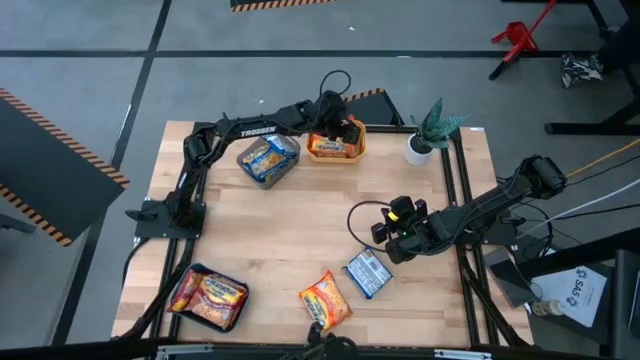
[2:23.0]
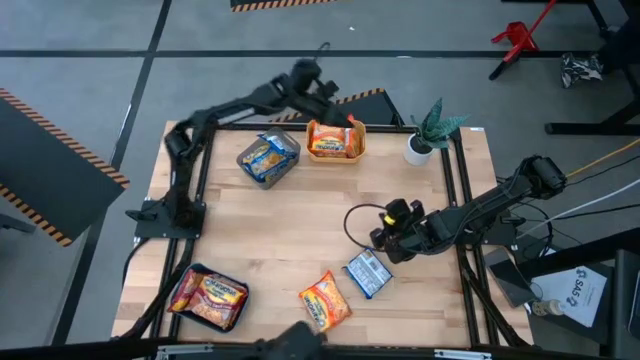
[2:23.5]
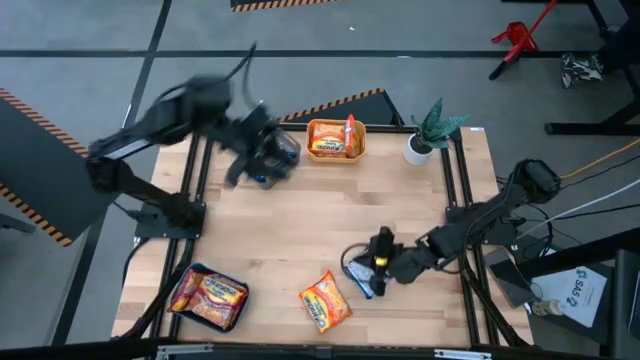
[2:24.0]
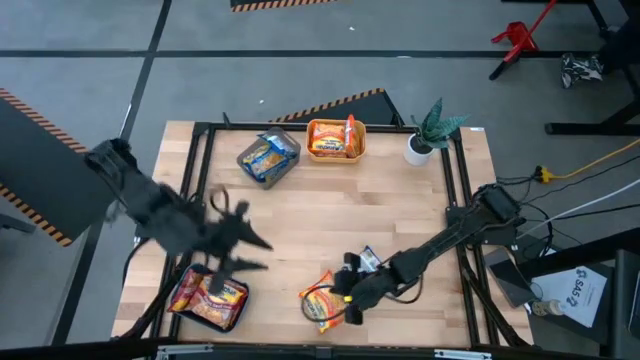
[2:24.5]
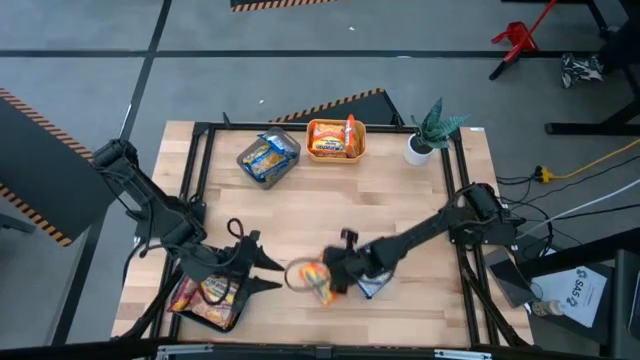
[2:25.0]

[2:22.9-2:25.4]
Task: Sort Maruchan noodles
Move the pack of orange ramen noodle soup from the bottom to the center

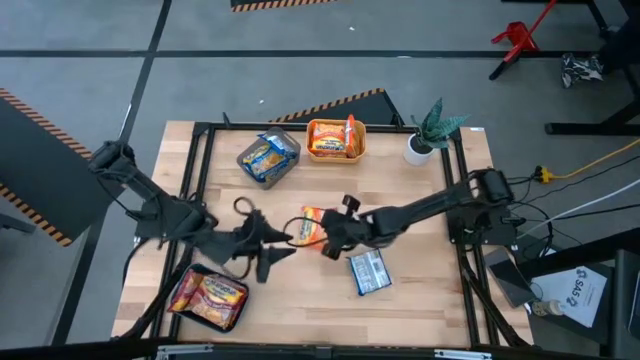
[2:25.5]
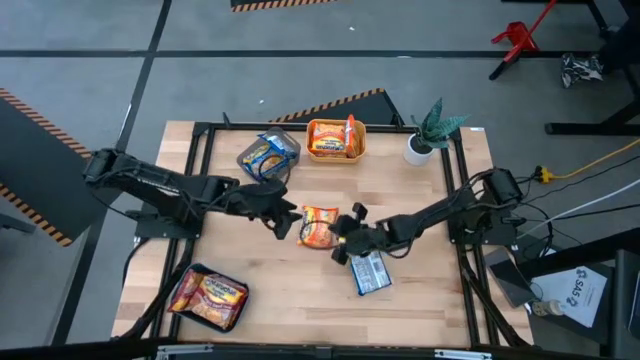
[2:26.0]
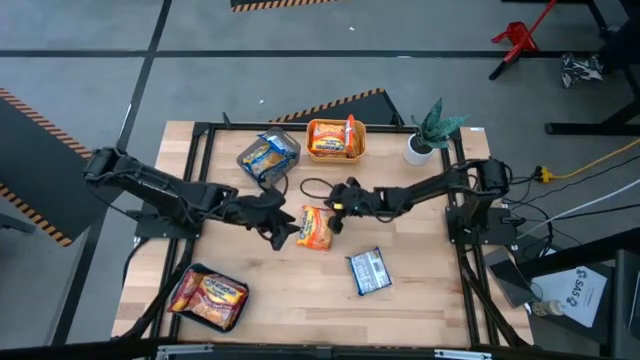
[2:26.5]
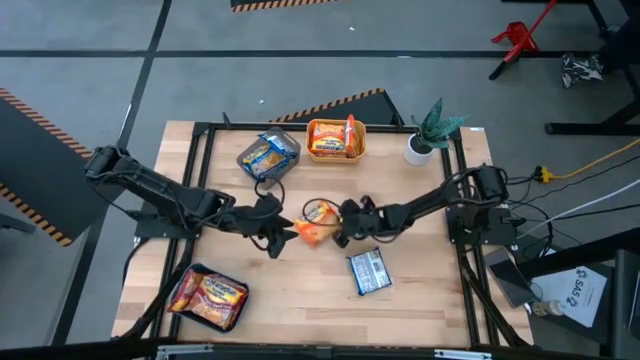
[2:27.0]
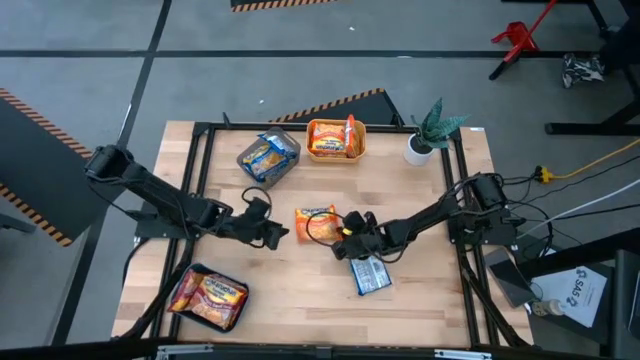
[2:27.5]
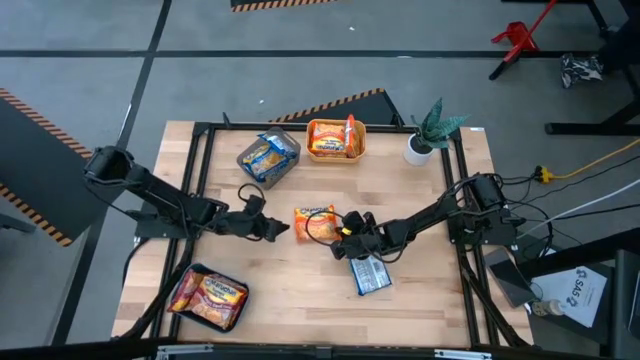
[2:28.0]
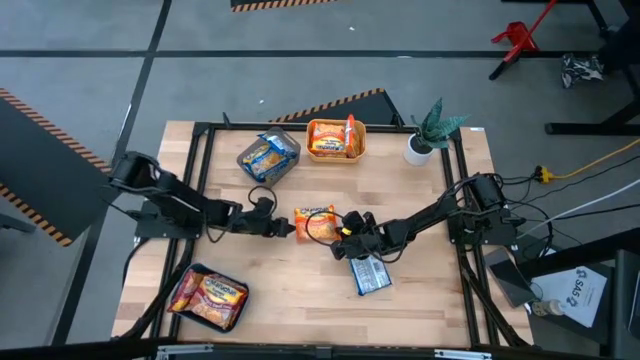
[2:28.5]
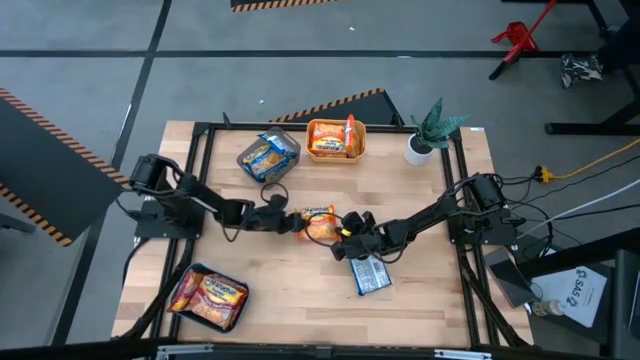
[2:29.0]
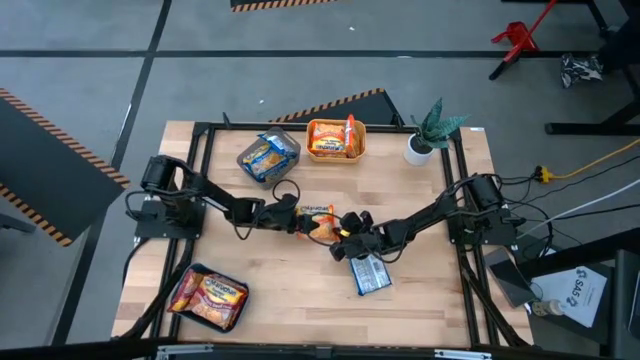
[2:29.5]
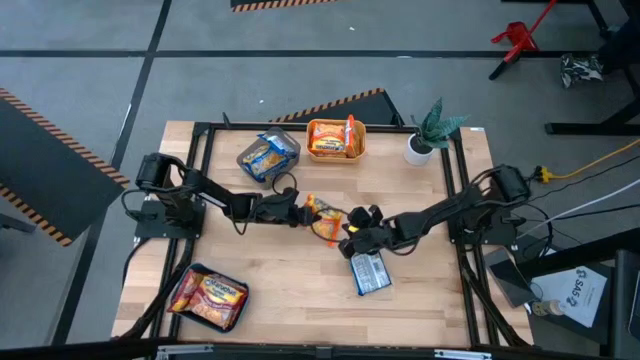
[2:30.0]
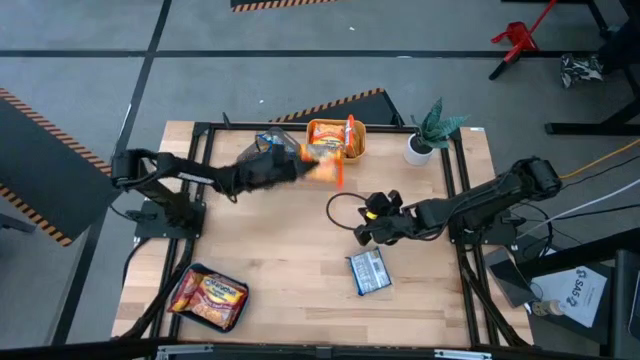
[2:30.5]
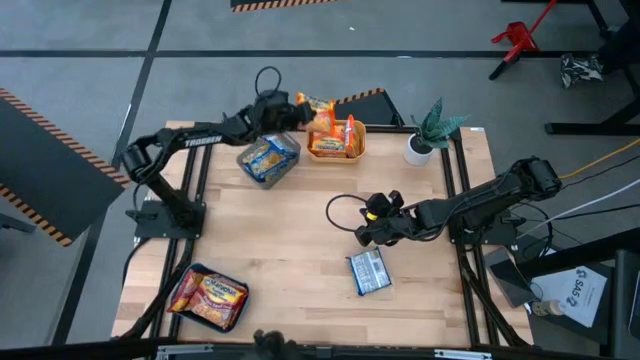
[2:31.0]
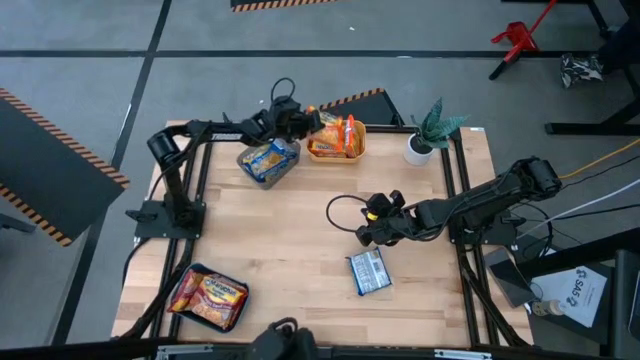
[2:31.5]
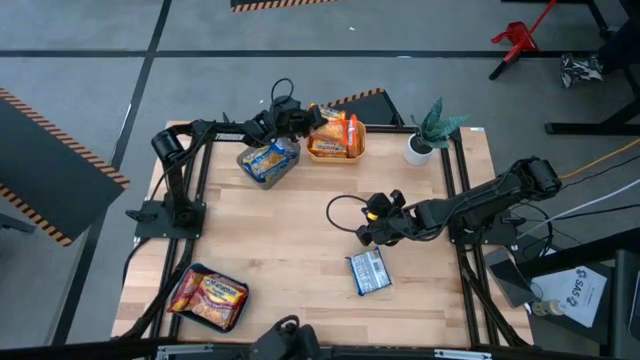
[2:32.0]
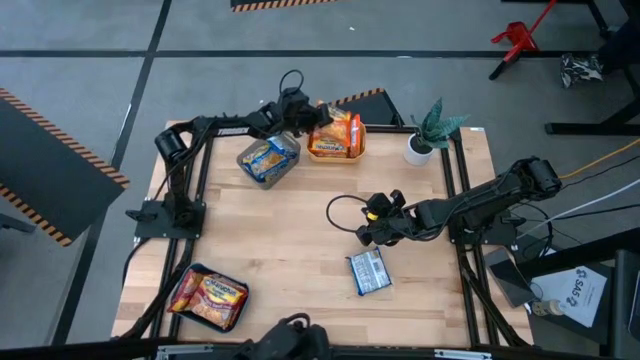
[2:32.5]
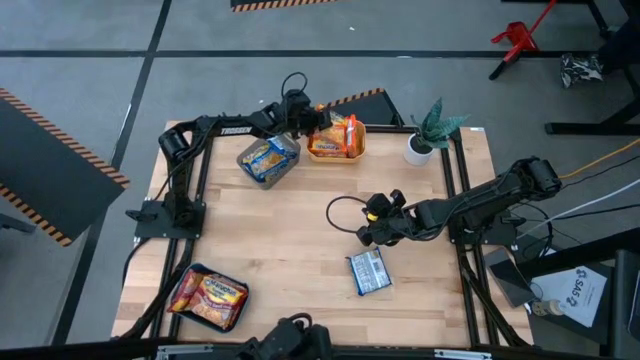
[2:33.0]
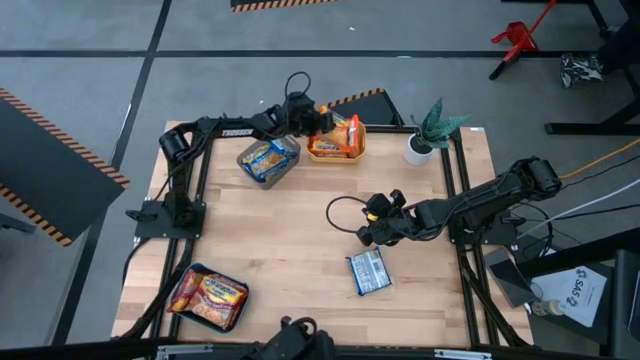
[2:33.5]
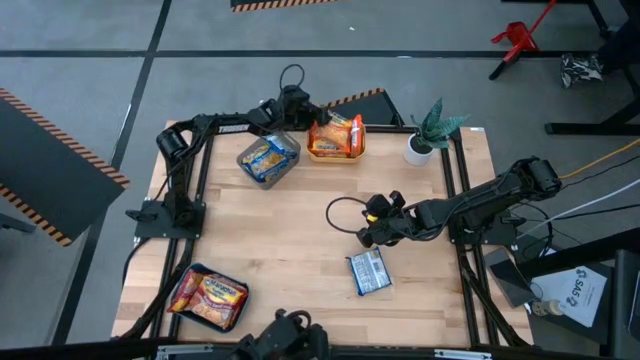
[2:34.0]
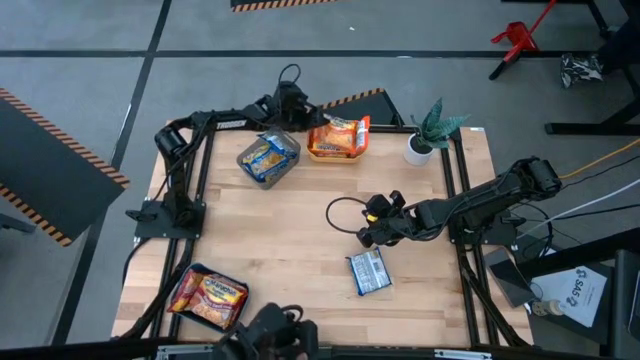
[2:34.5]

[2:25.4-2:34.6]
Put the pack of orange ramen noodle soup into the yellow bin

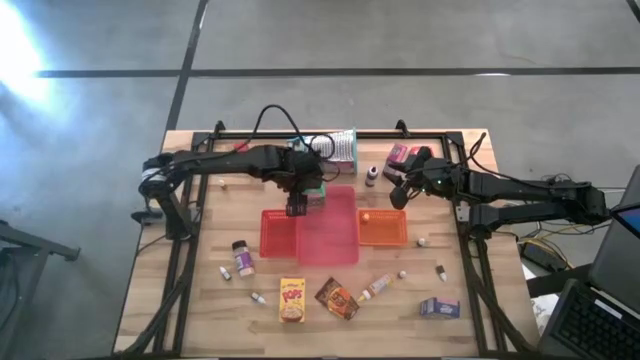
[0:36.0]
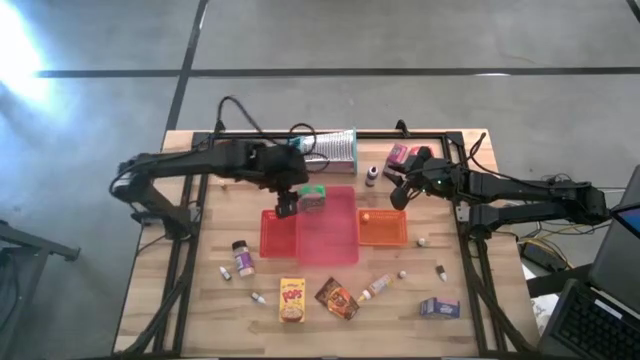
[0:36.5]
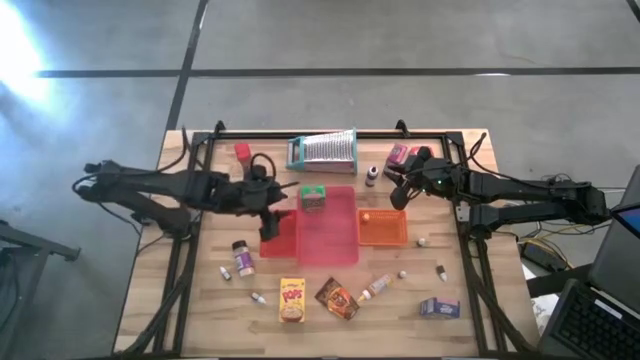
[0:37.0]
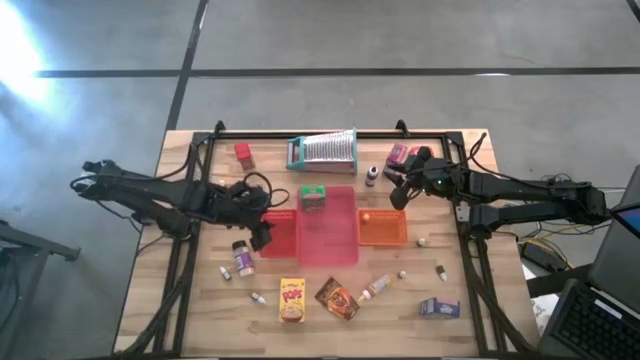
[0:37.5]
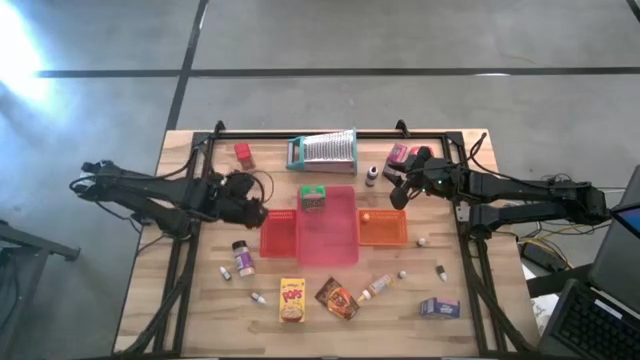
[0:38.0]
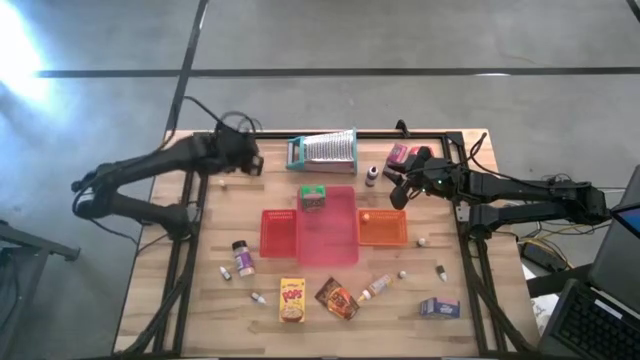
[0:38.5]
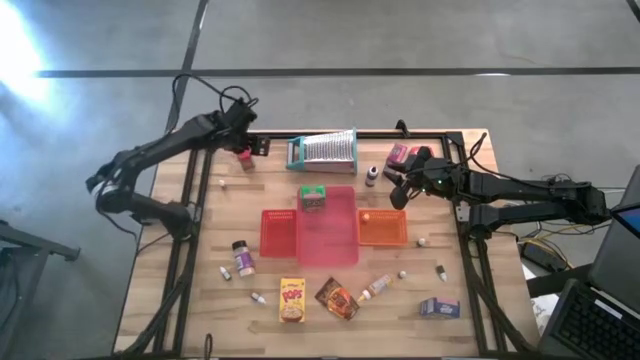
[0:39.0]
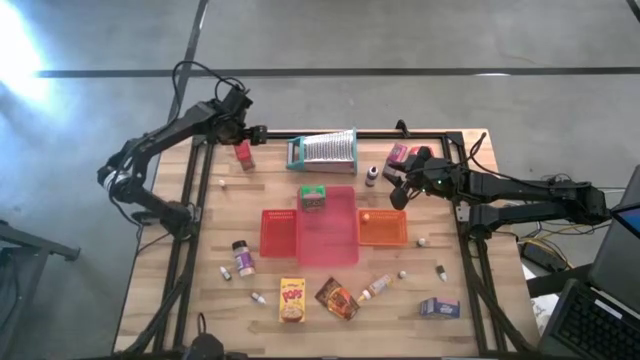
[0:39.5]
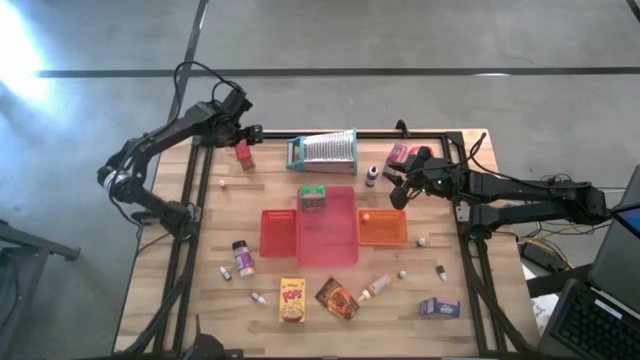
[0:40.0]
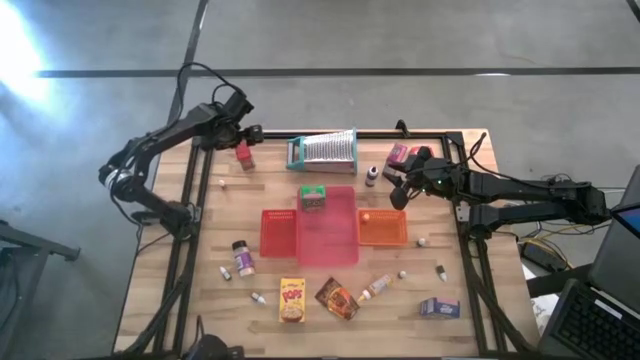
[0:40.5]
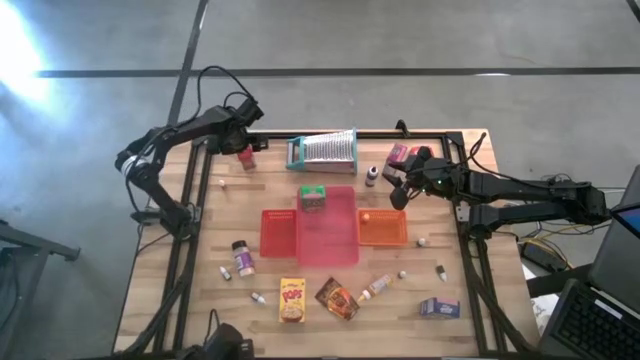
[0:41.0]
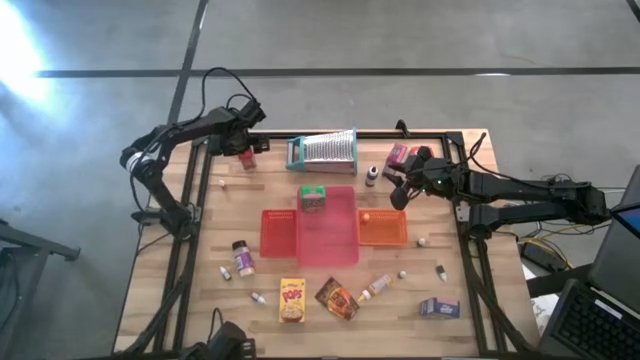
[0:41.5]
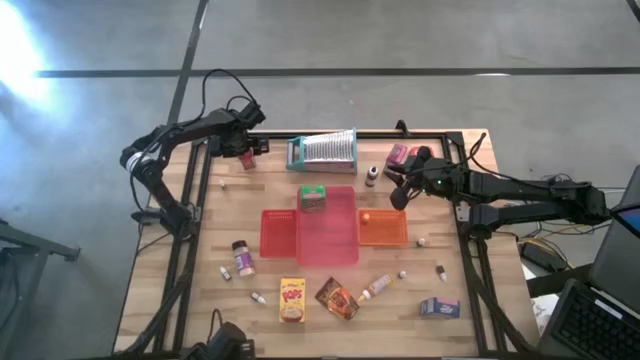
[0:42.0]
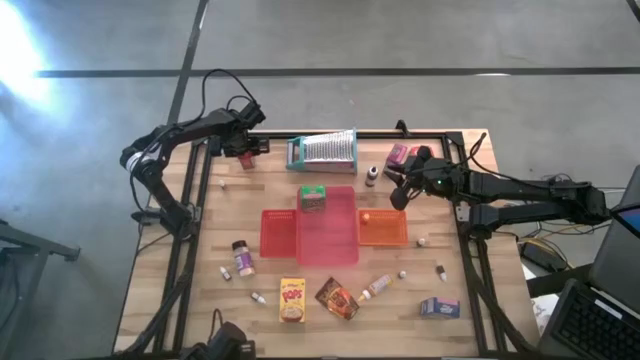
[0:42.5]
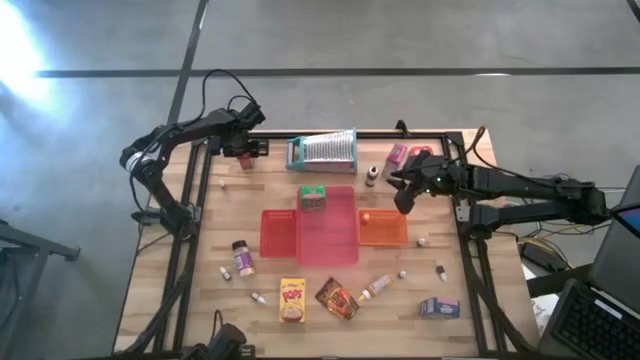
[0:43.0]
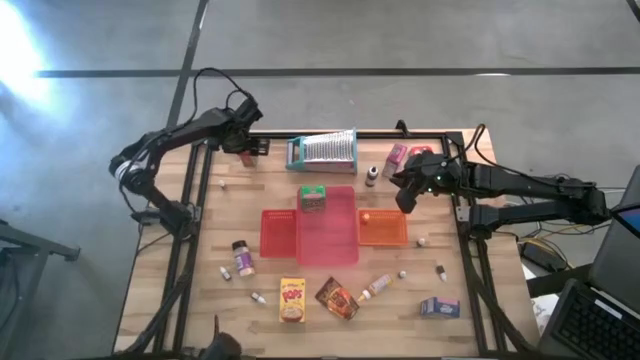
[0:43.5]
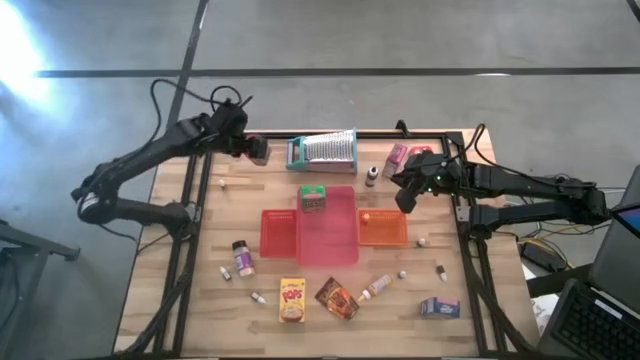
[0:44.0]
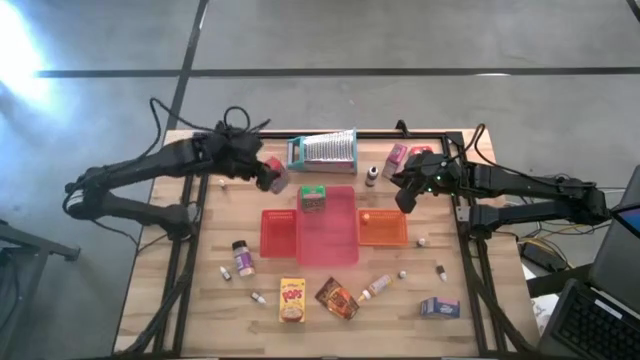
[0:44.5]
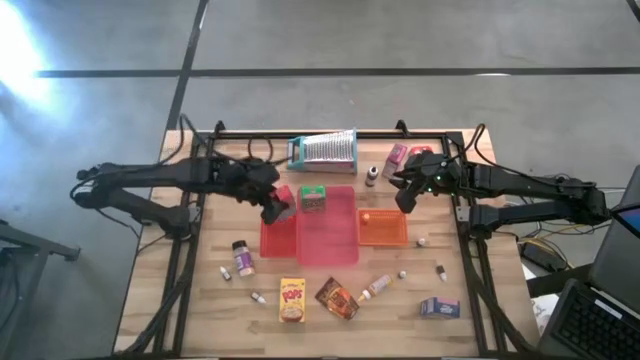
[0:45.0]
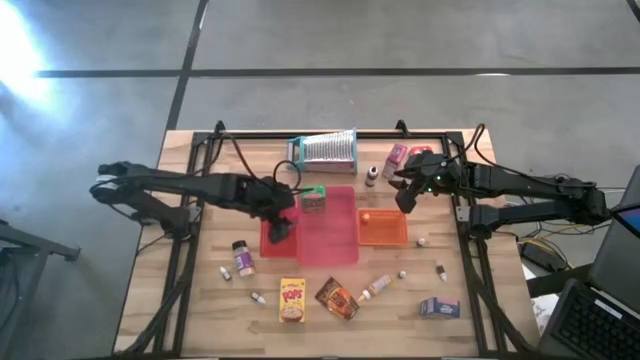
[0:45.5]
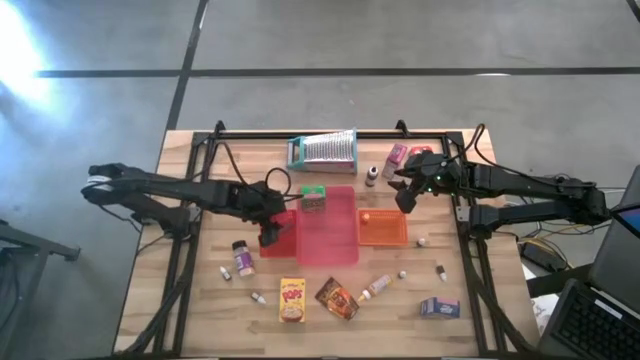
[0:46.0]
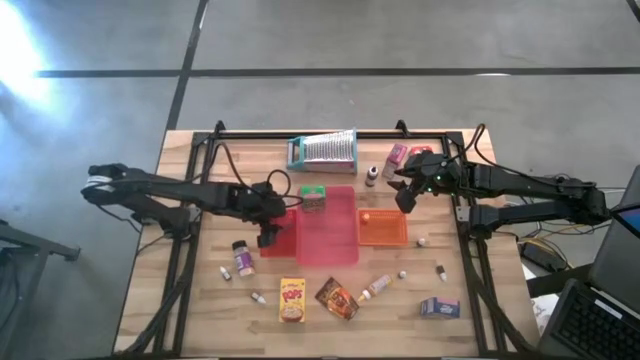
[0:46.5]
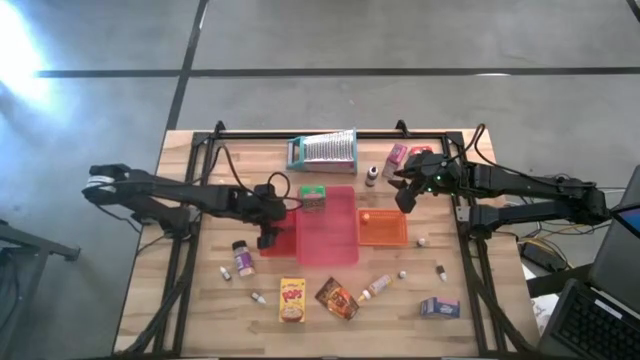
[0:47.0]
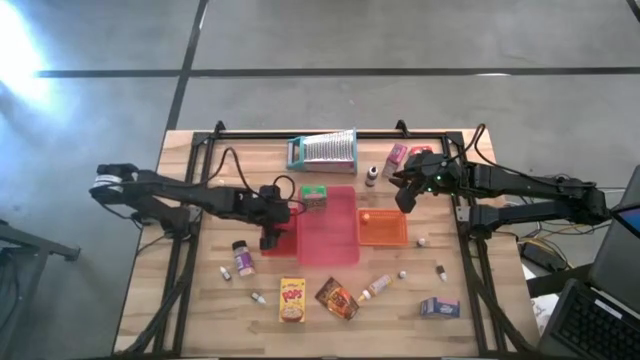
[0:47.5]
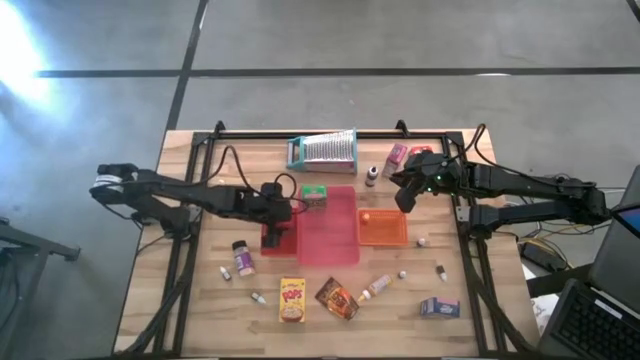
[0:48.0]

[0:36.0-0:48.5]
Task: Pick & Place Kitchen Items
Put the red spice can into the red bin
